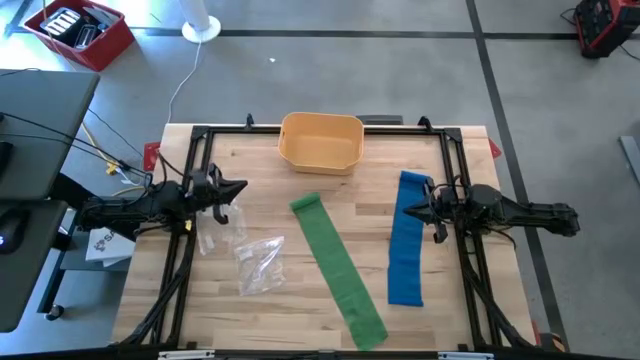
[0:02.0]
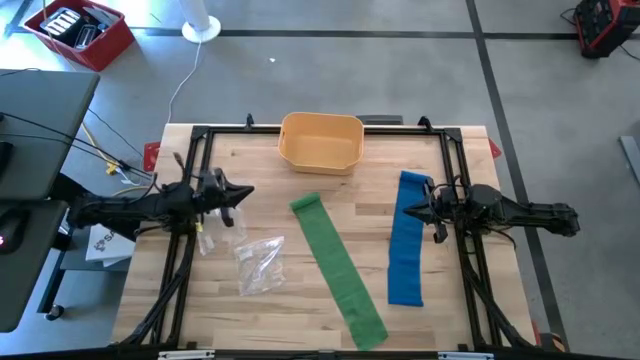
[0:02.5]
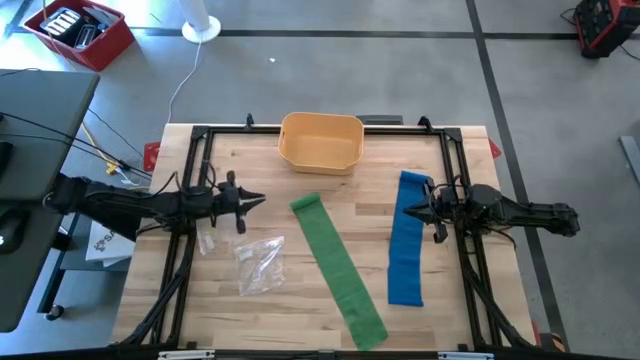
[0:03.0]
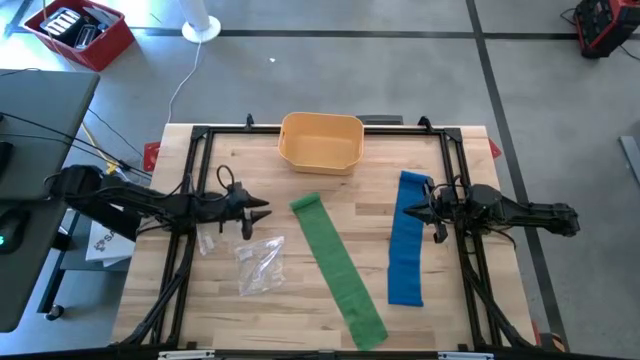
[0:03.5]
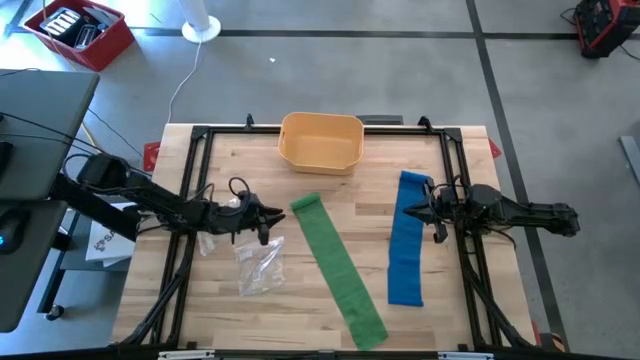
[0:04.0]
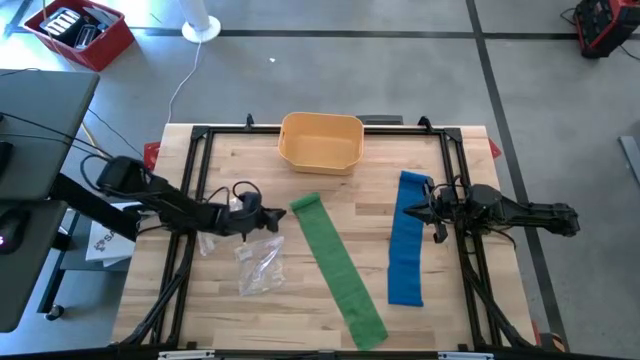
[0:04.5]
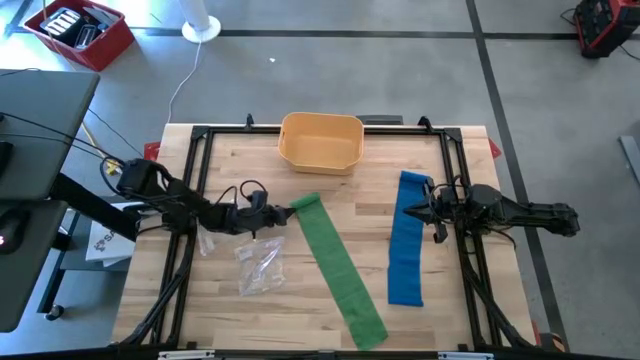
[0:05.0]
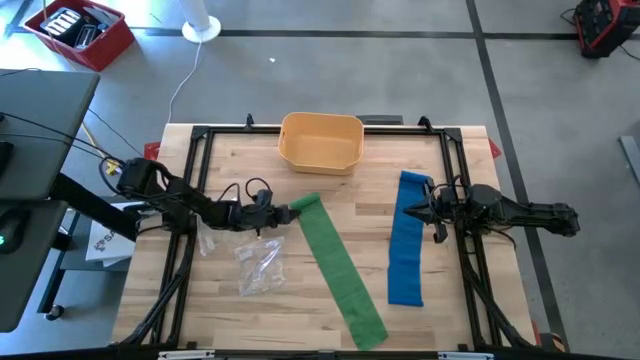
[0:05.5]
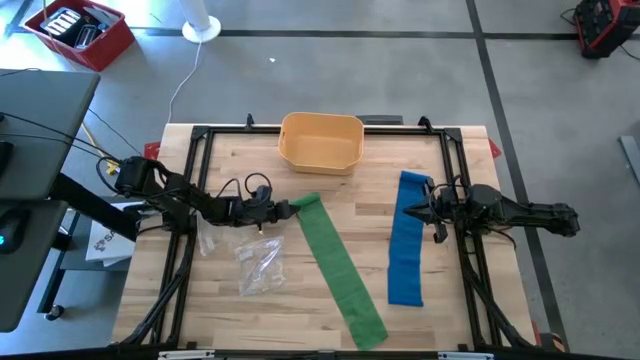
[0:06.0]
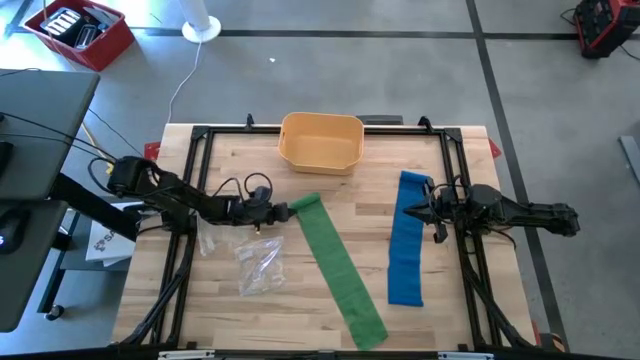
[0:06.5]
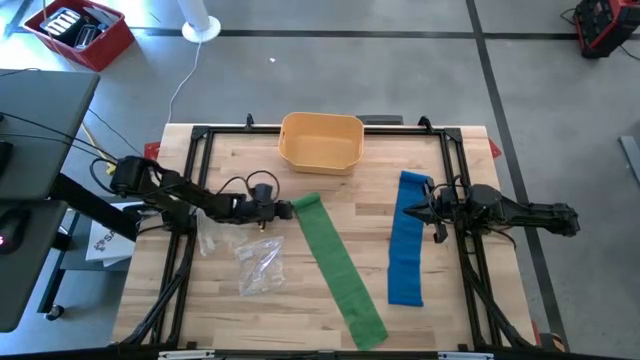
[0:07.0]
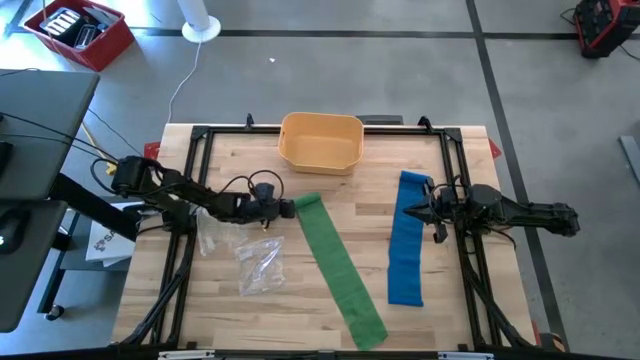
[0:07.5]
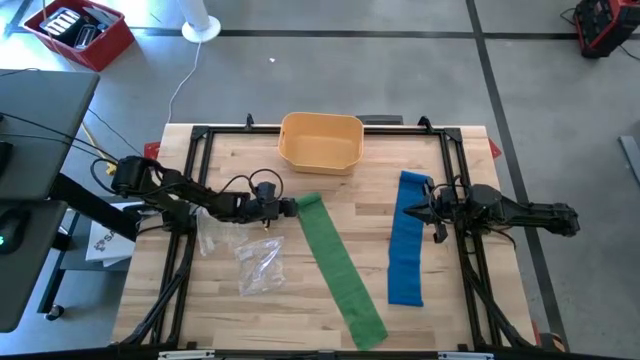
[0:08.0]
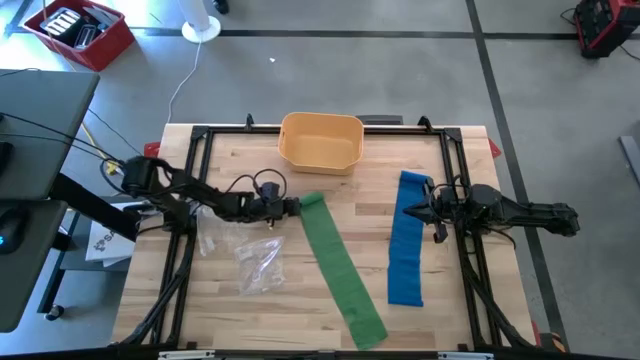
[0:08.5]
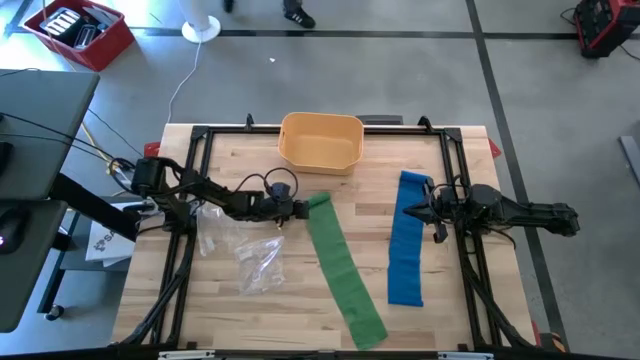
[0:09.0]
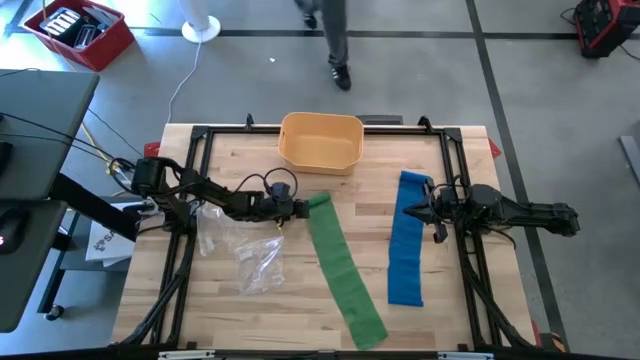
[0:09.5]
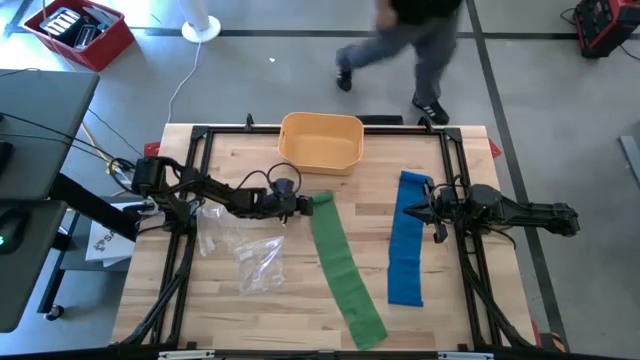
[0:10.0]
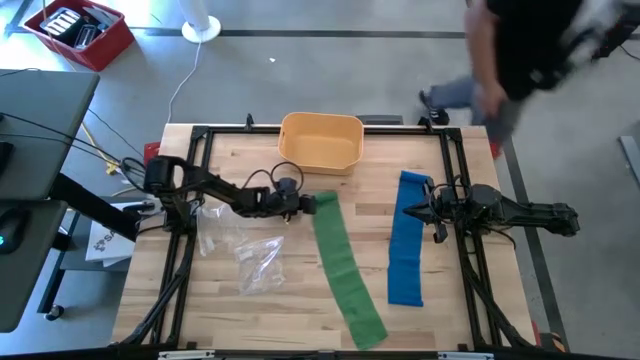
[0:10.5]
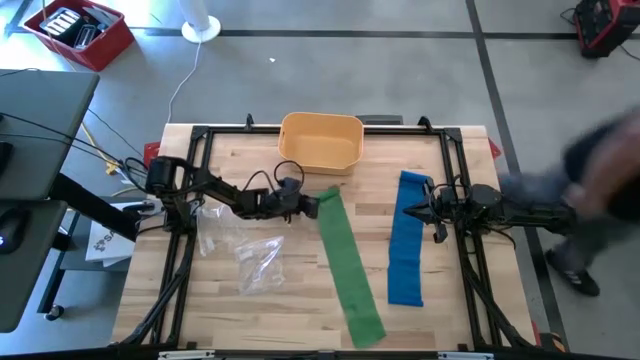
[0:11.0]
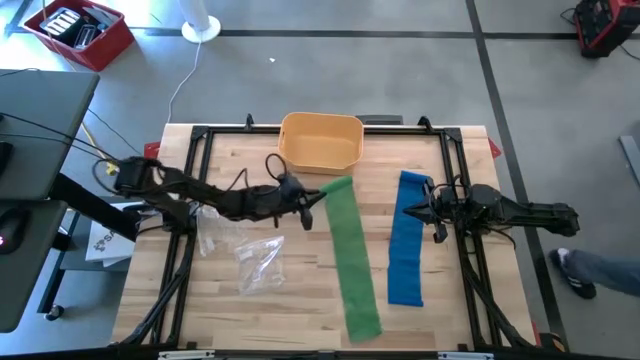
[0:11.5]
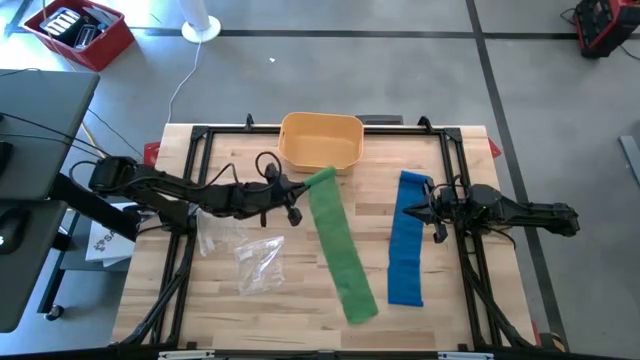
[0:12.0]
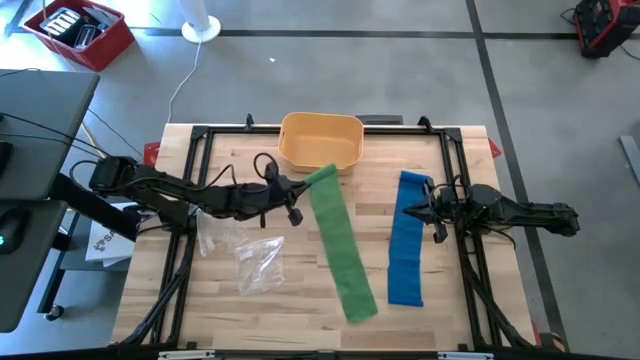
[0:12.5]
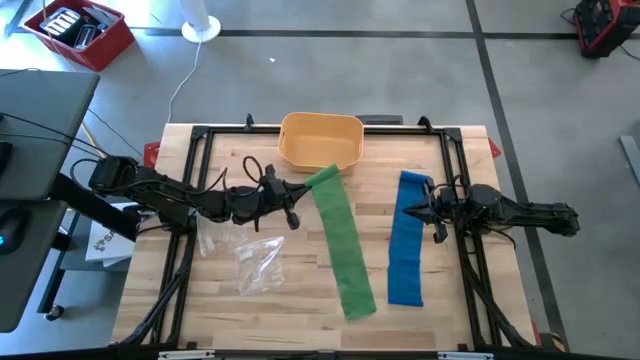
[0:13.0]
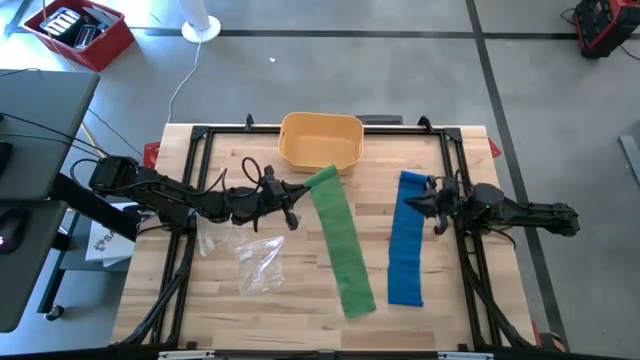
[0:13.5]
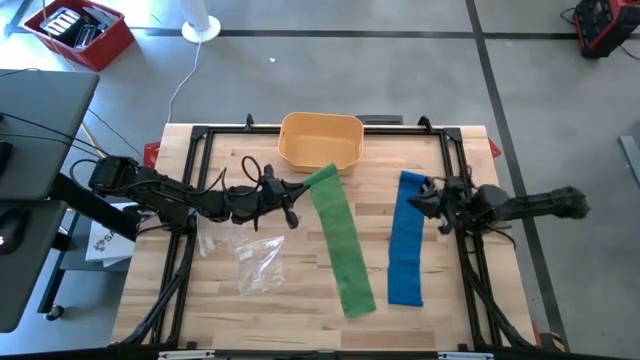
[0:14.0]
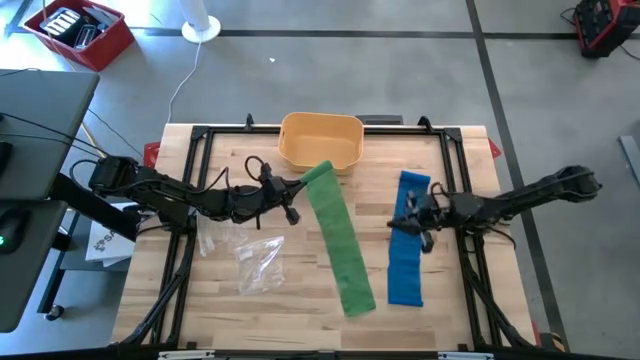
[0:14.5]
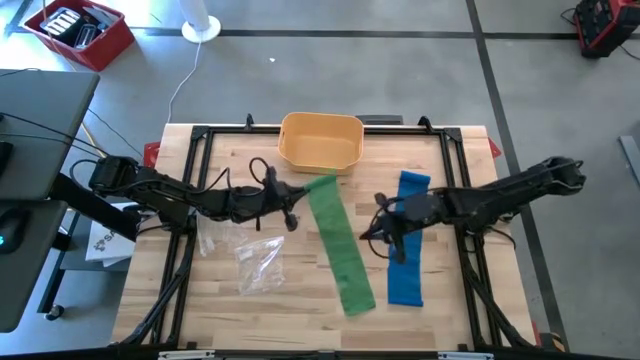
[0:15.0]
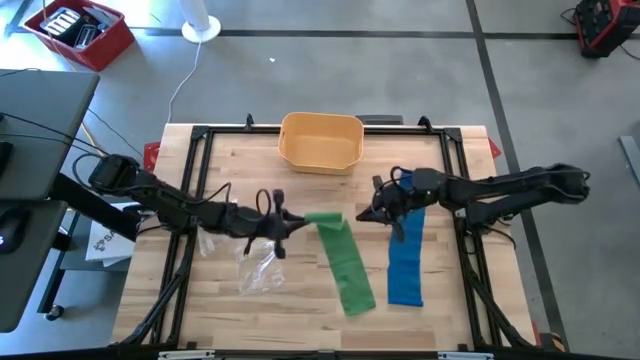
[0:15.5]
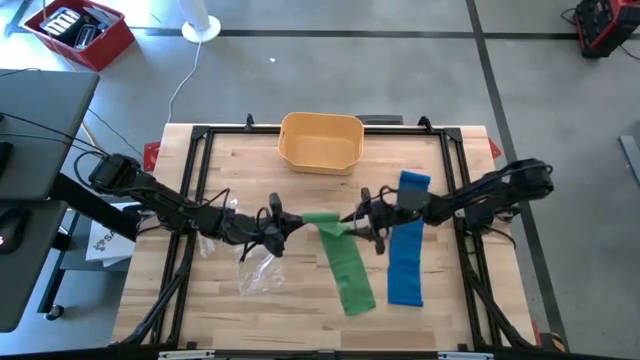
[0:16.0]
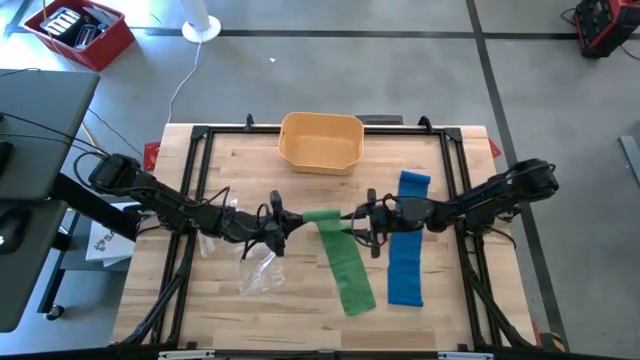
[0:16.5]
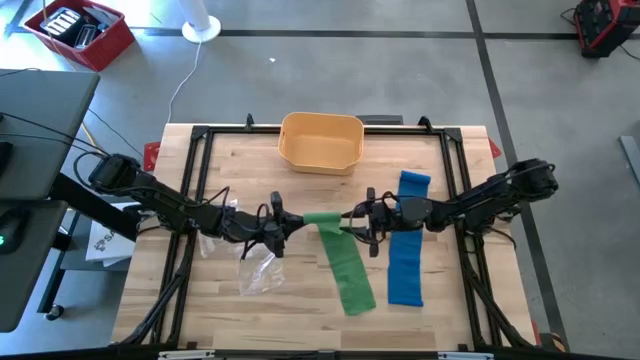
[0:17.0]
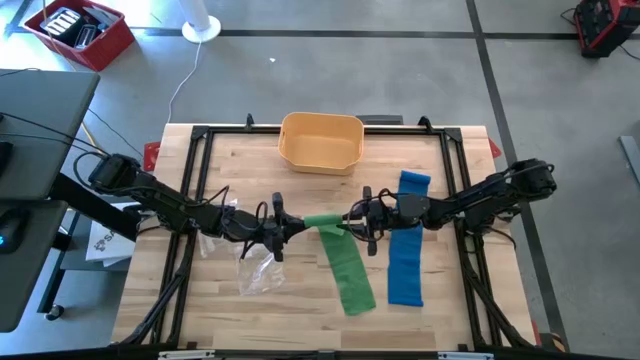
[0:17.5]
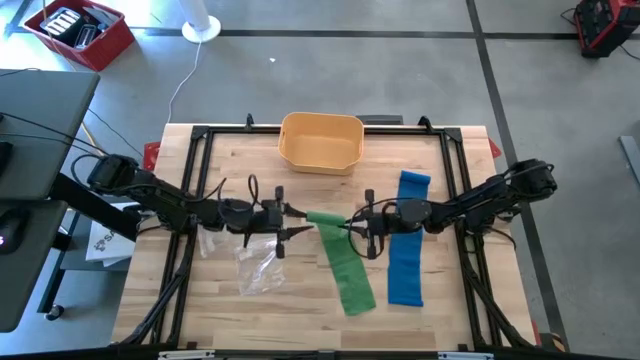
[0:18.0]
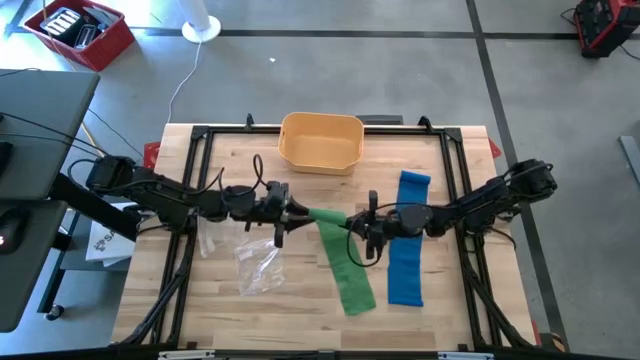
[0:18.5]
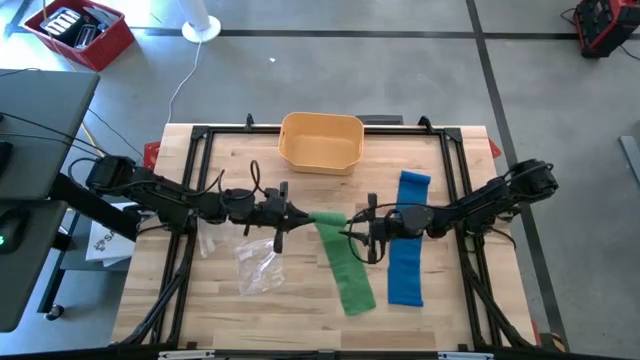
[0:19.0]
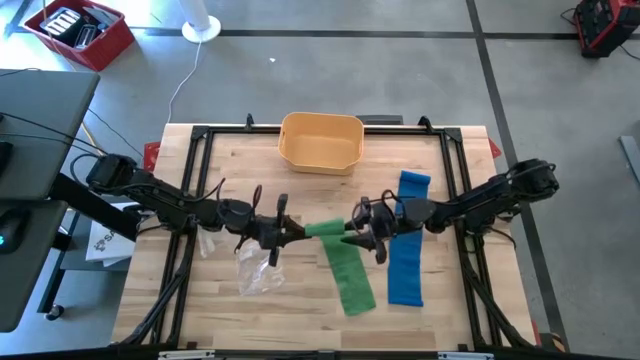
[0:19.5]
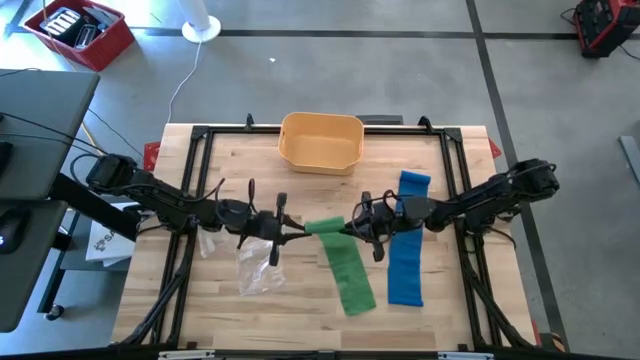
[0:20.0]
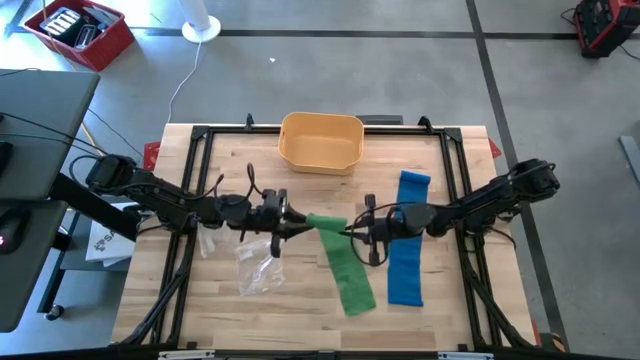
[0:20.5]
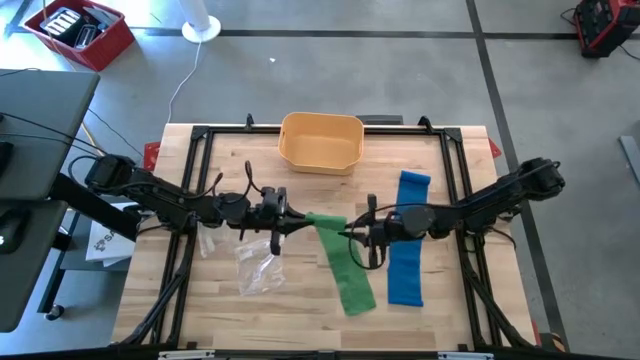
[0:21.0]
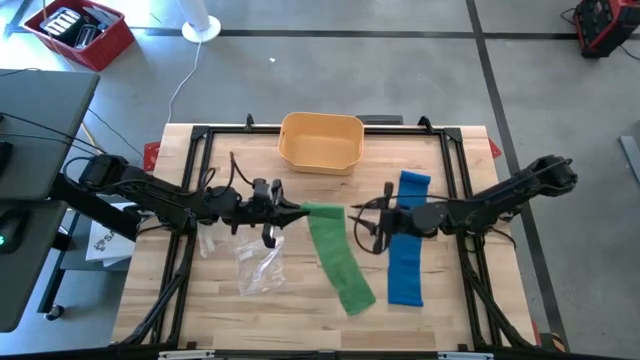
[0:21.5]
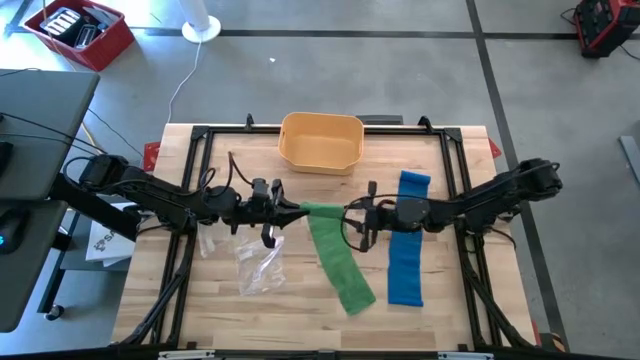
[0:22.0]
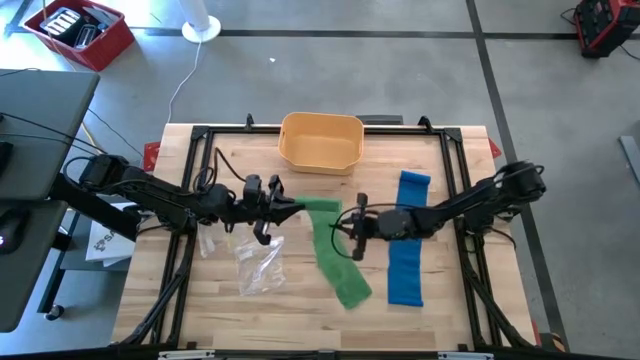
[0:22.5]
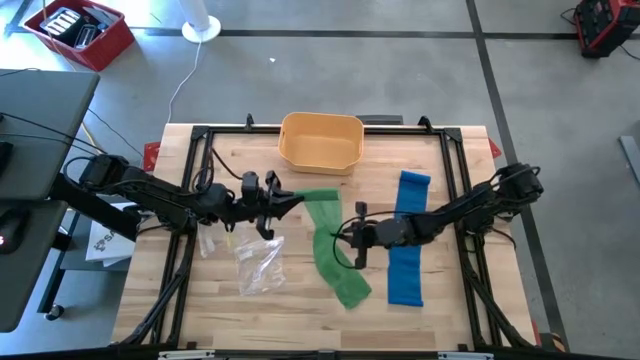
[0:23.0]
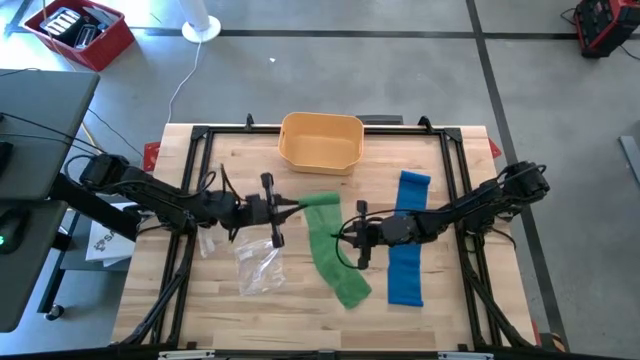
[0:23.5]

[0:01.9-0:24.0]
Task: Roll bandage
Roll the green bandage
